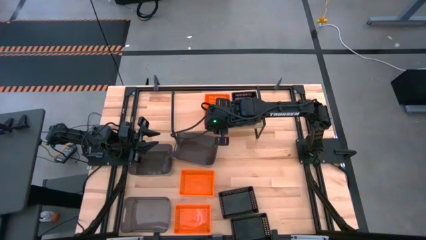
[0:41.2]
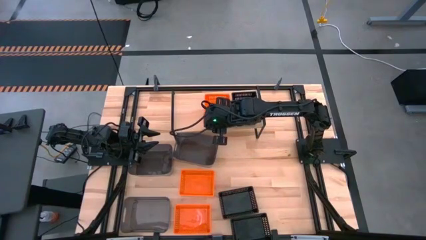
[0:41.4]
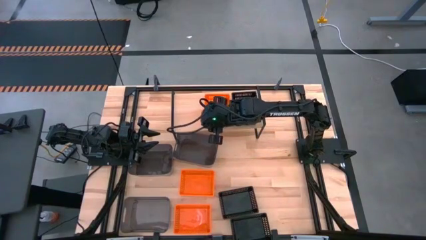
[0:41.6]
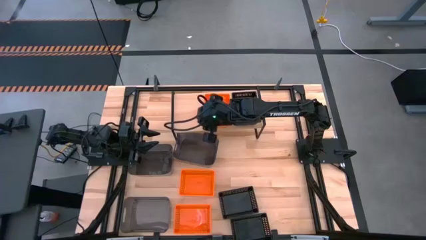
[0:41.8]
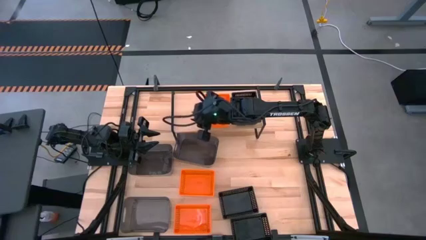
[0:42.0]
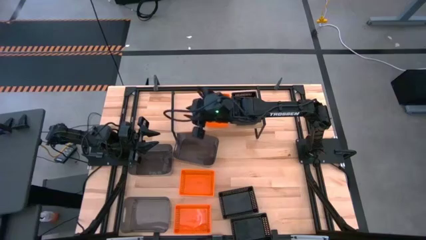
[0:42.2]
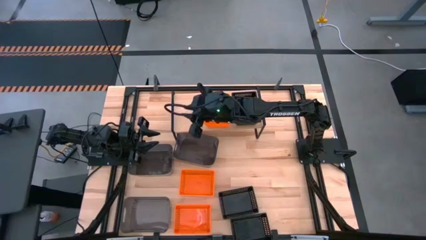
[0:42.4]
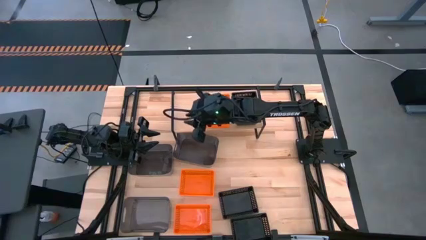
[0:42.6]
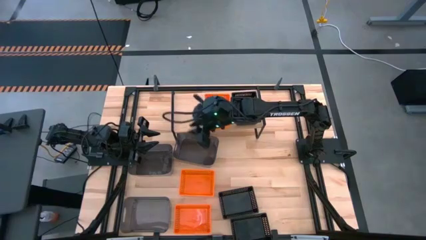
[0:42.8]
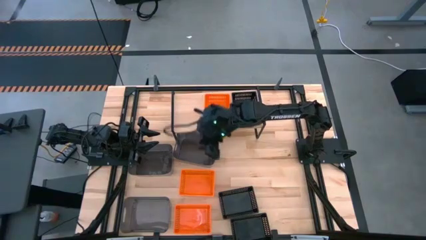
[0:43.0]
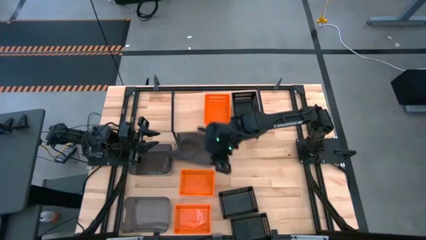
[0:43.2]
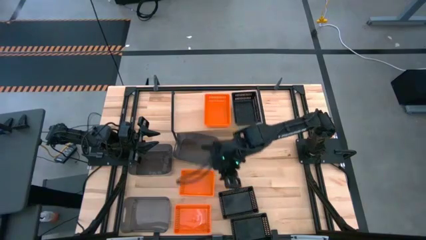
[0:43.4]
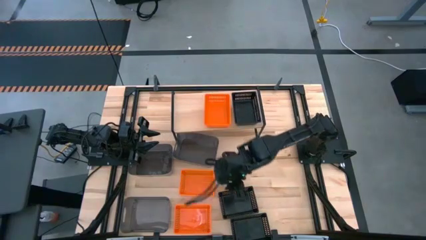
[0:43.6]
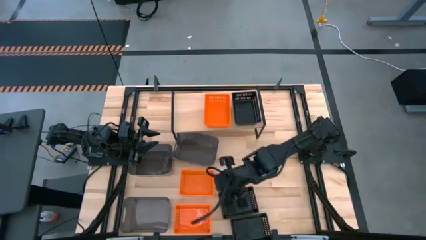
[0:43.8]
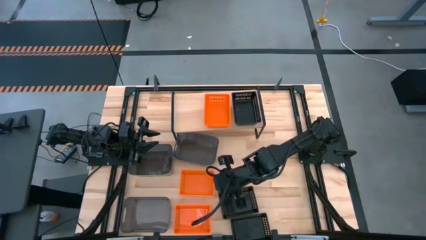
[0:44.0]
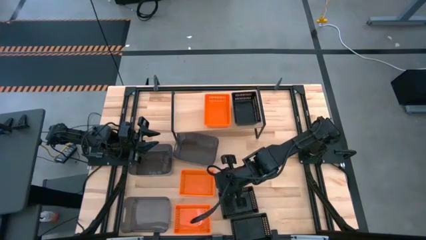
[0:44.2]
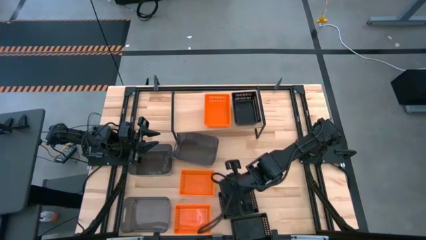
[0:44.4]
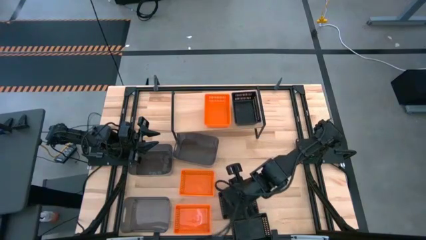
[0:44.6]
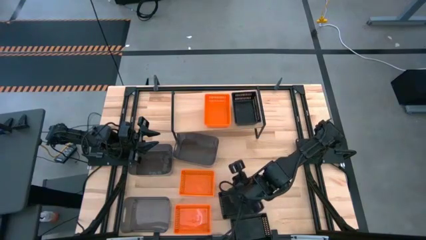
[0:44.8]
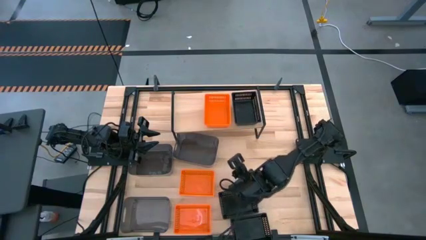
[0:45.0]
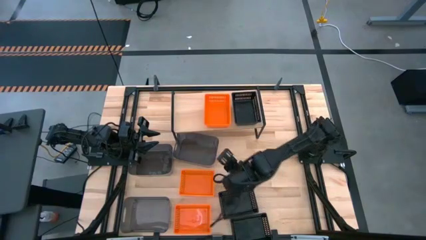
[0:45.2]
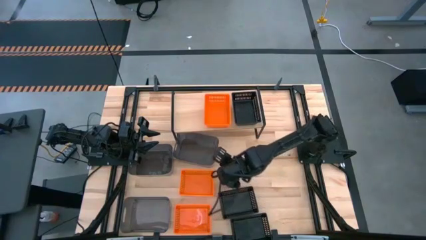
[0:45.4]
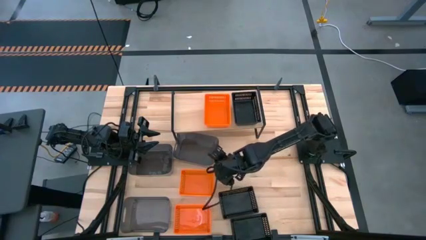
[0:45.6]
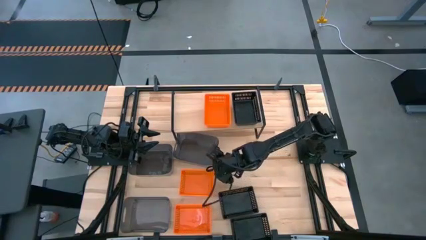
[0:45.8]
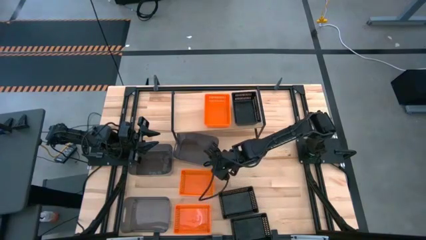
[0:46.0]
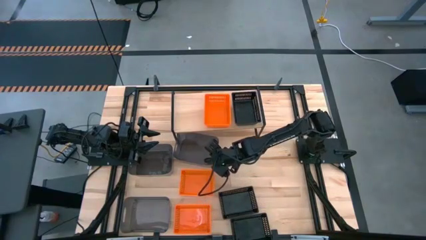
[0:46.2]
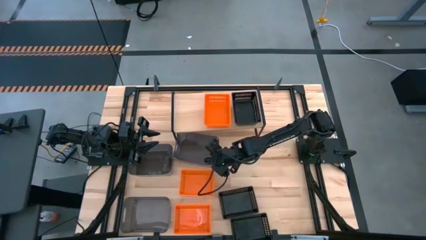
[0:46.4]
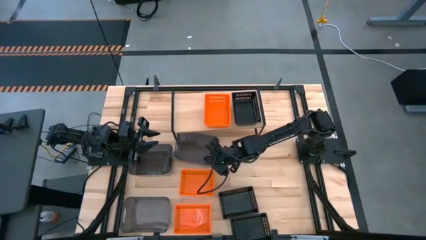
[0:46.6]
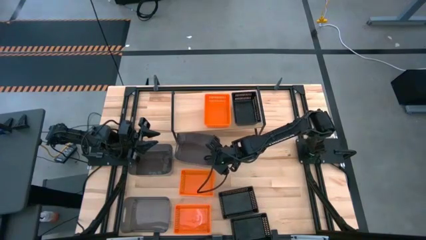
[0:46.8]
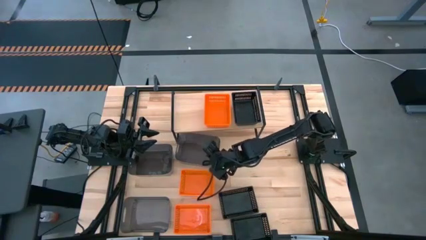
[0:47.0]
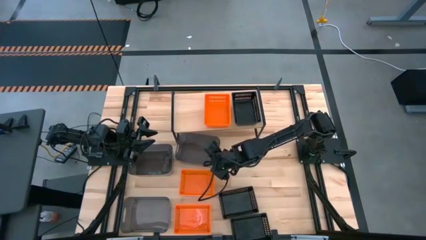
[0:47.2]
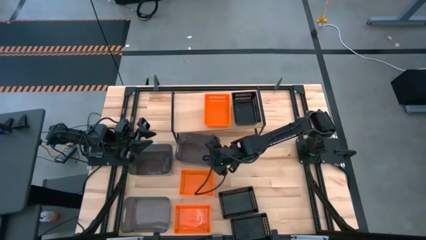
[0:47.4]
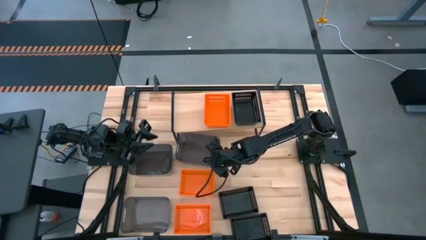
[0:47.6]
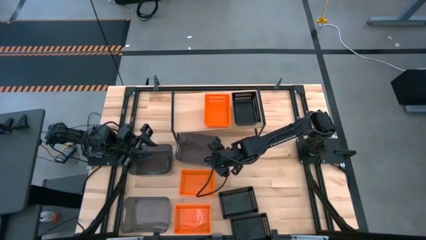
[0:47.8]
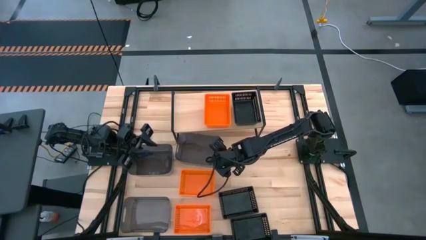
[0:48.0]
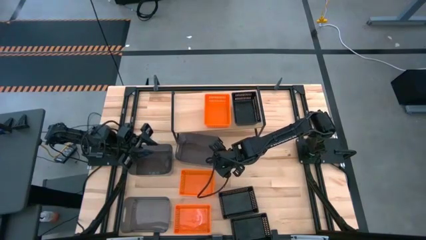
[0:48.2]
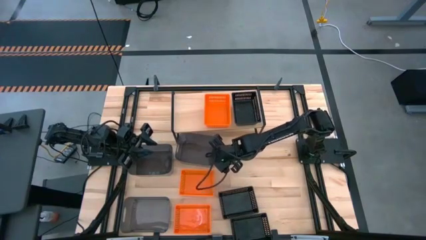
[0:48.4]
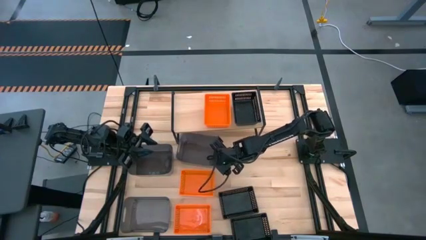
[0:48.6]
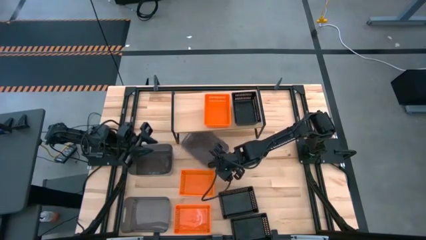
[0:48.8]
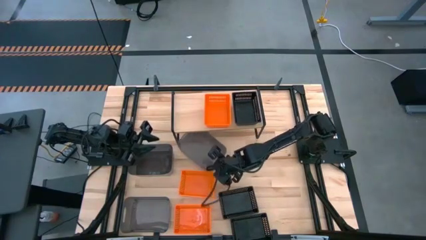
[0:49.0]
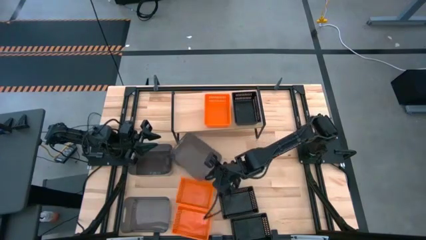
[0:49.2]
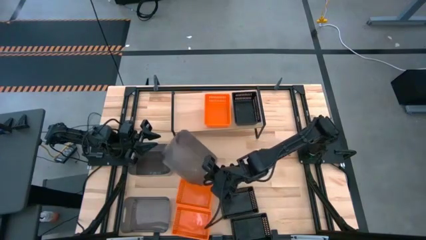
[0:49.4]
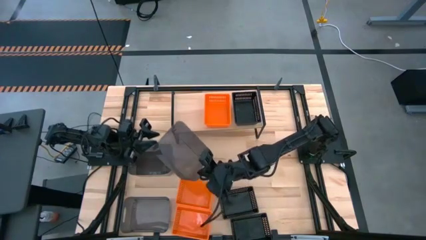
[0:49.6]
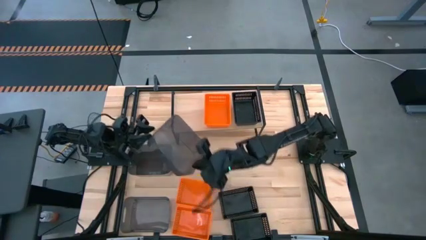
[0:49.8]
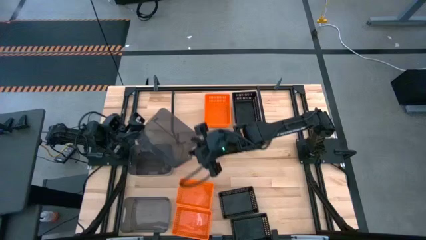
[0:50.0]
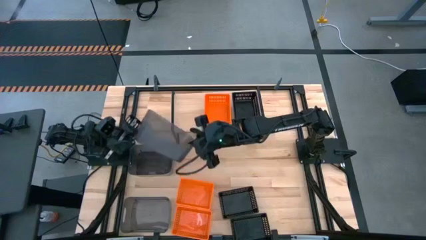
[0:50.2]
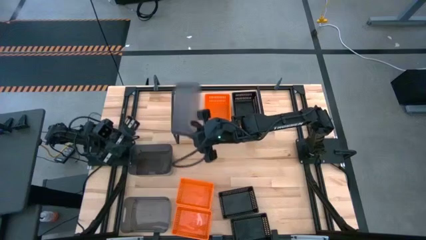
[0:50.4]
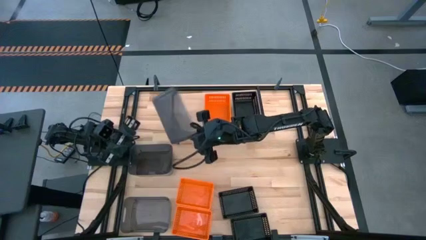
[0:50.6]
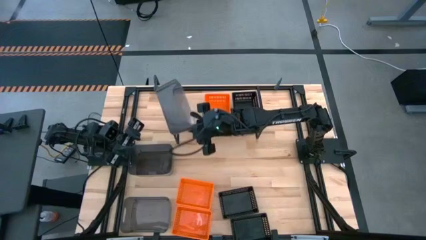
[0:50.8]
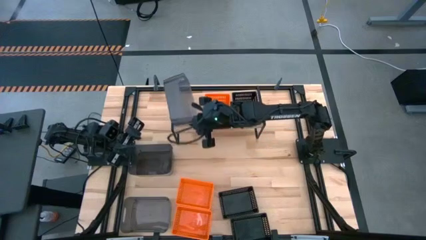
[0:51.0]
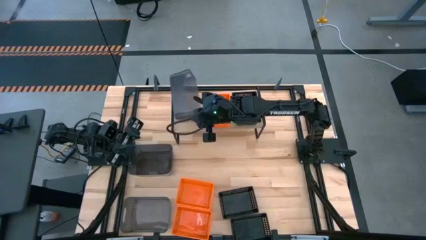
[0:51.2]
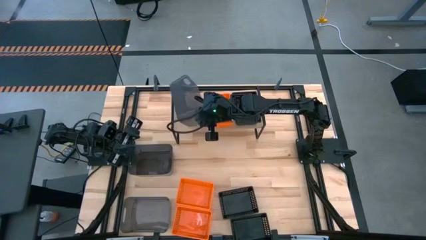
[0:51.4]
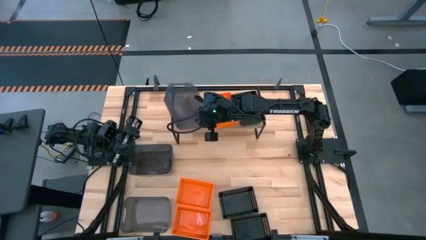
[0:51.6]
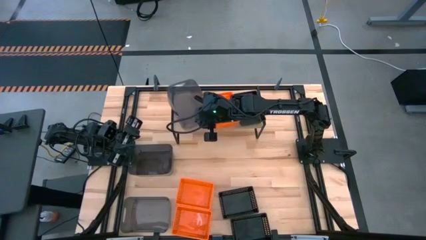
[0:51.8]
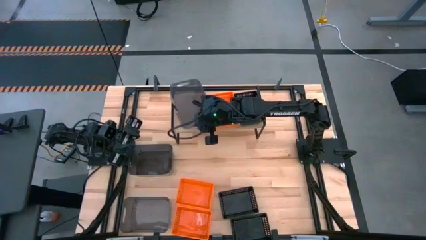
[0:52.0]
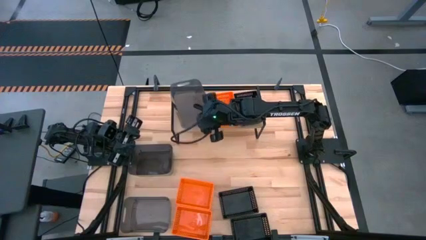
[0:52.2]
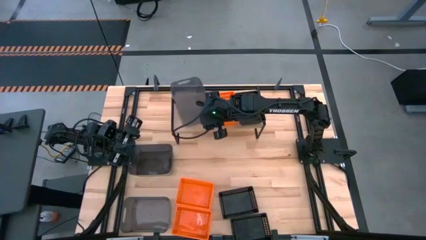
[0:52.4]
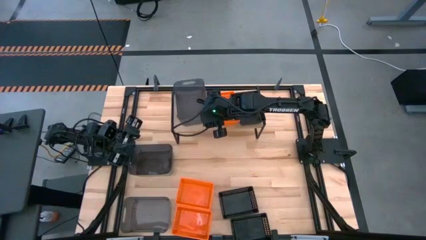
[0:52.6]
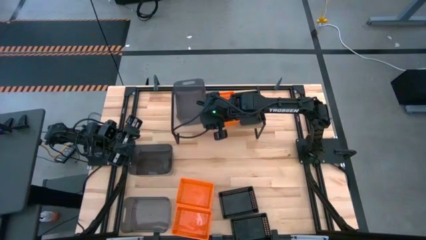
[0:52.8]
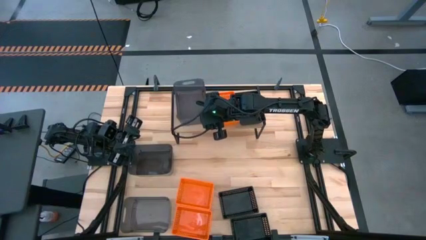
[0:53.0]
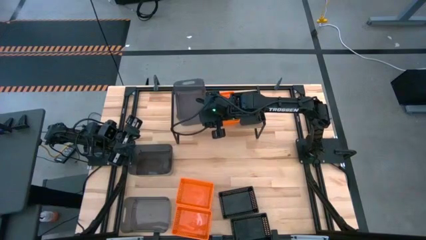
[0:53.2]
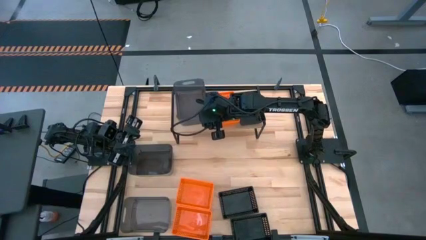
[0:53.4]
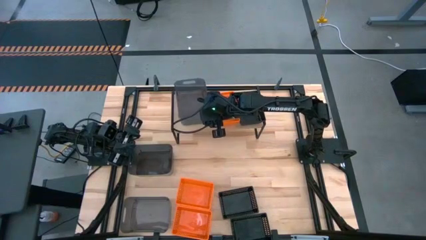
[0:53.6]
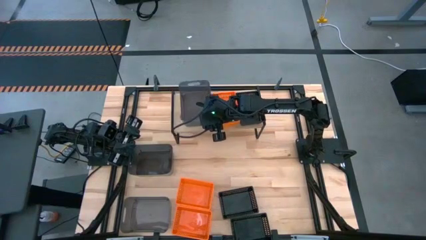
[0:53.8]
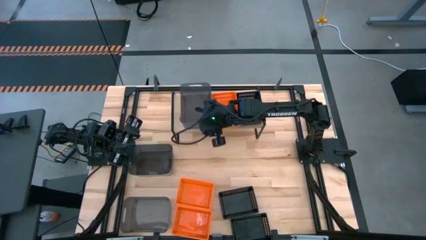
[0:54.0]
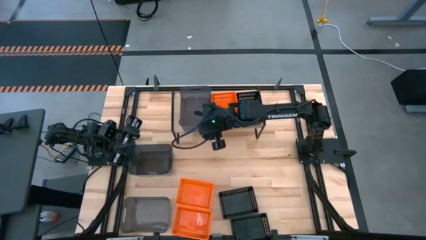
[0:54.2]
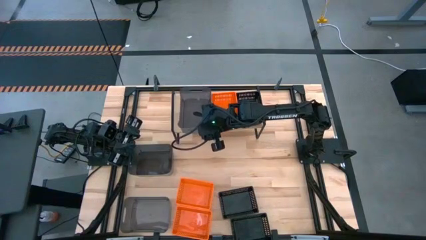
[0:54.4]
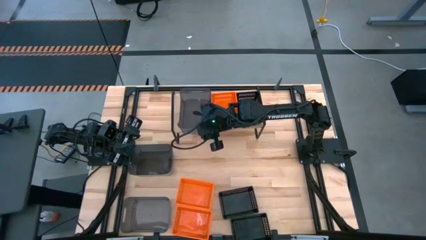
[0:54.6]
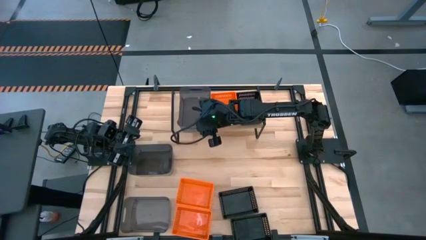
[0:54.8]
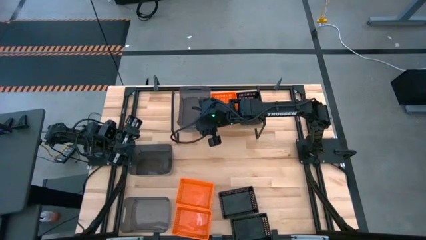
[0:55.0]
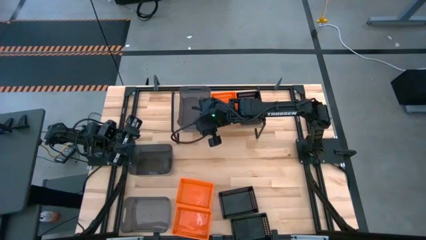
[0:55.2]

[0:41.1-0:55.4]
Task: Stack baskets on shelf by color
Put the top right black transparent bin on the shelf

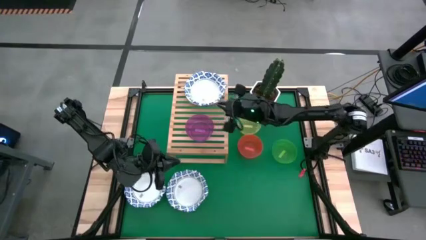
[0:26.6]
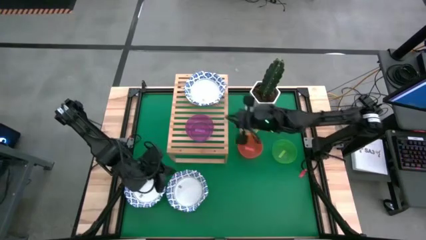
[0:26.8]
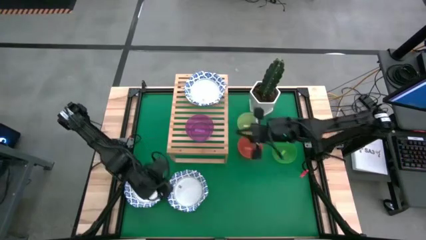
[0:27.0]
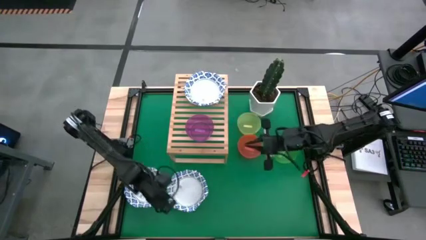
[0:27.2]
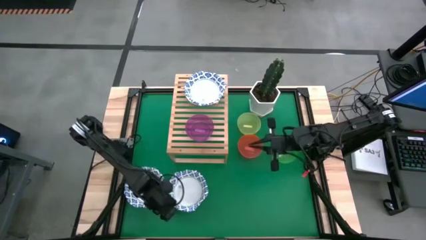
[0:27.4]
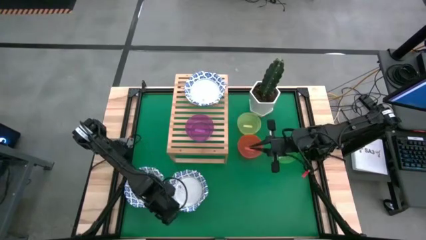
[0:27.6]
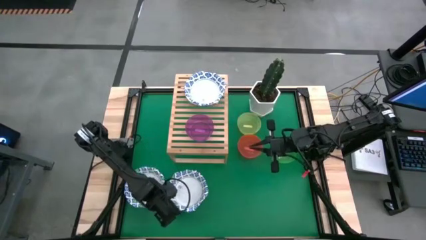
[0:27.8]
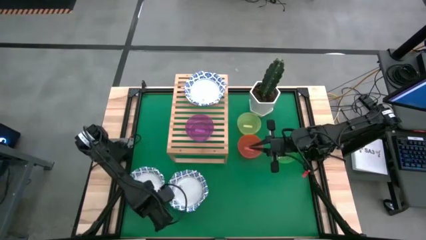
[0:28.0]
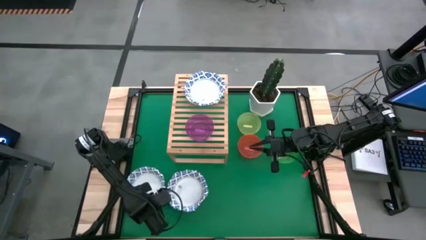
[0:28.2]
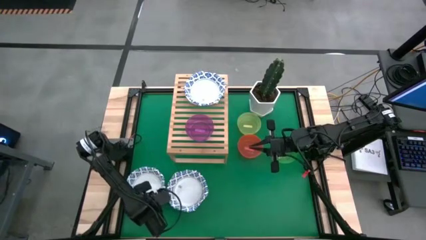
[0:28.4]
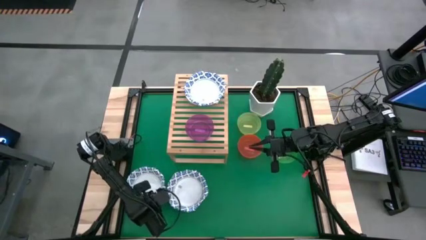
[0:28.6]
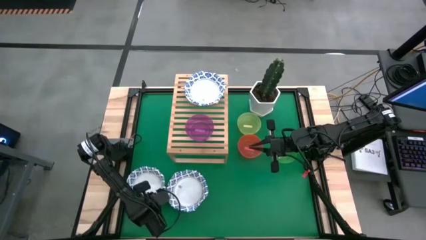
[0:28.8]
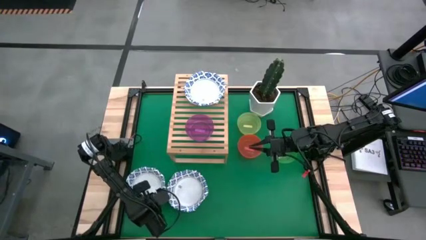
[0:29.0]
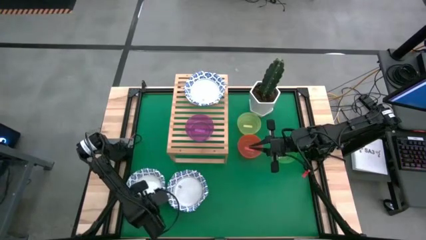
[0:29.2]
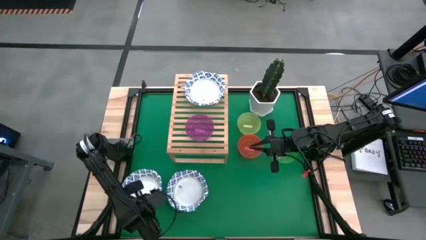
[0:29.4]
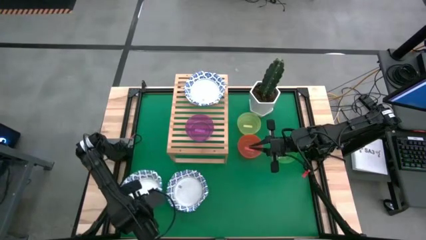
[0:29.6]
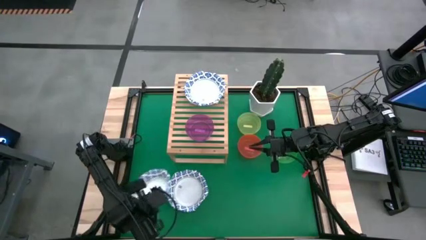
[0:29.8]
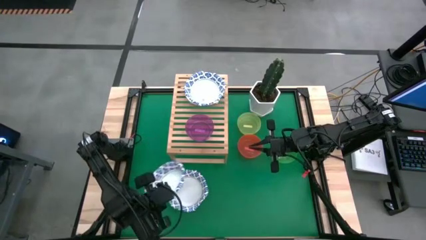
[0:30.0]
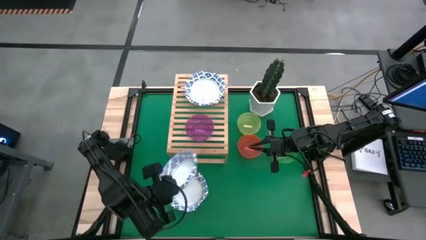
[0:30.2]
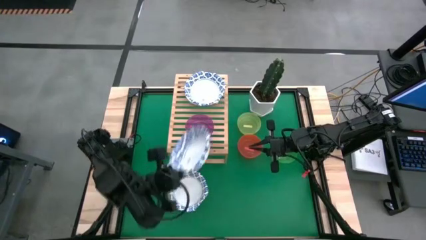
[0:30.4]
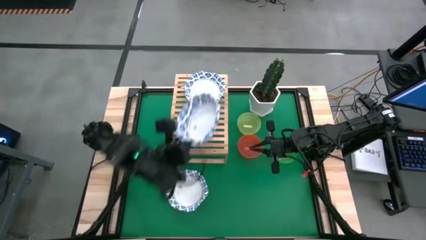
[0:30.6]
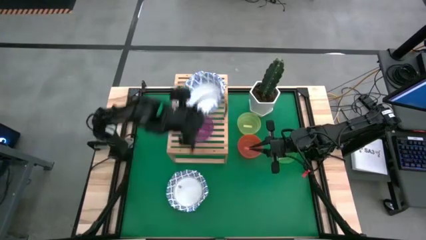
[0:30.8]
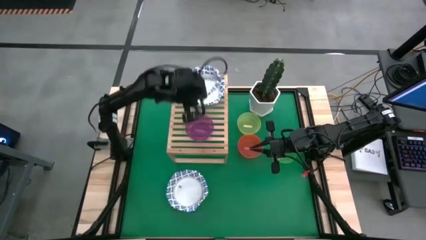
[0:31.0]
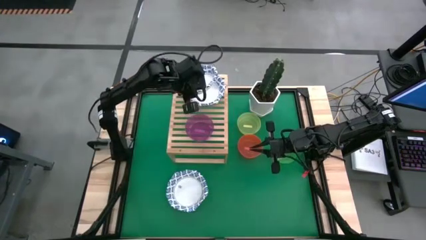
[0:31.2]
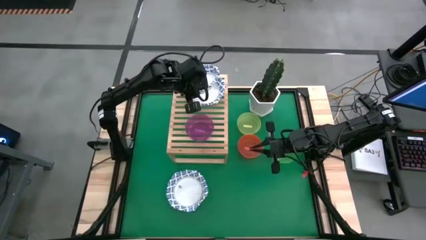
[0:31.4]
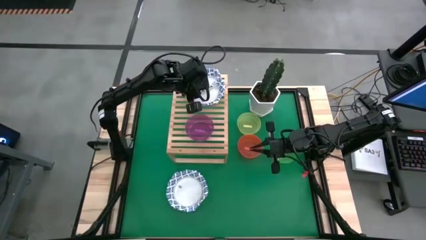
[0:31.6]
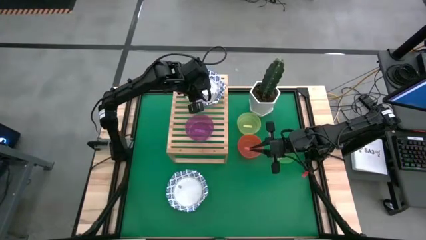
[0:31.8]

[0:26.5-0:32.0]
Task: Place and stack bowls onto a shelf
Stack the white and blue bowl on top with the other white and blue bowl on the shelf
